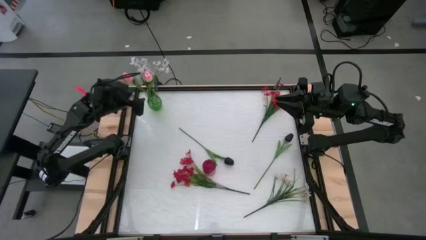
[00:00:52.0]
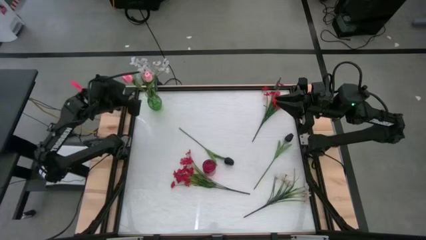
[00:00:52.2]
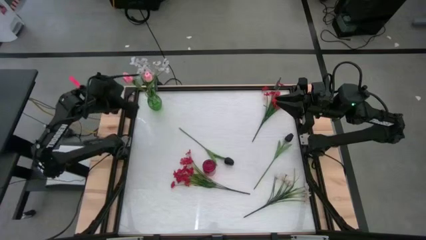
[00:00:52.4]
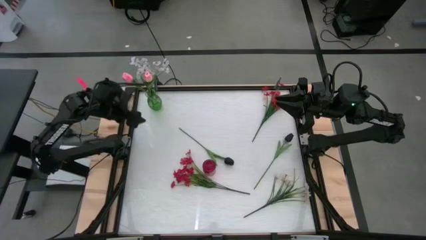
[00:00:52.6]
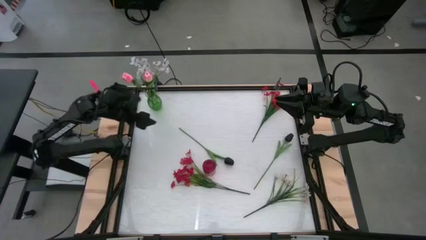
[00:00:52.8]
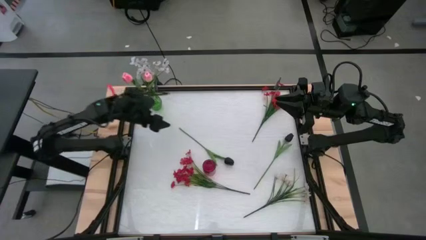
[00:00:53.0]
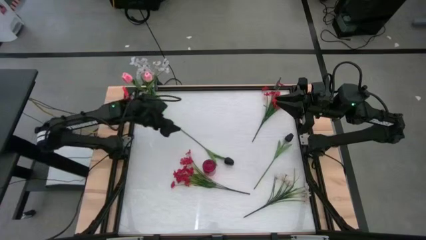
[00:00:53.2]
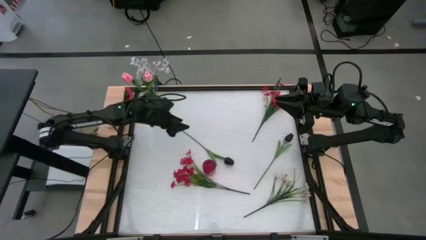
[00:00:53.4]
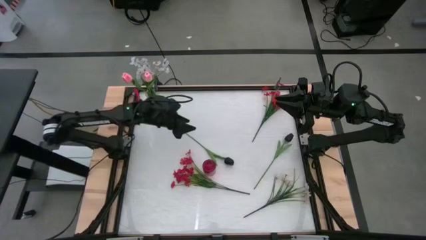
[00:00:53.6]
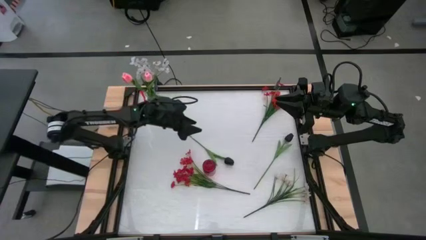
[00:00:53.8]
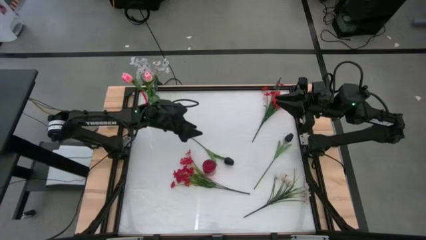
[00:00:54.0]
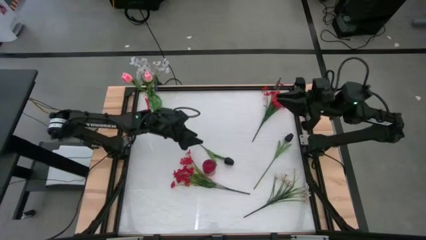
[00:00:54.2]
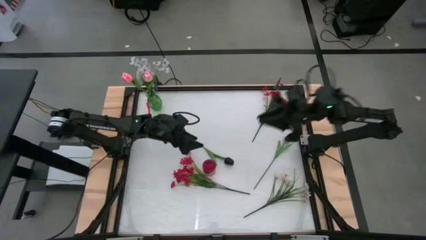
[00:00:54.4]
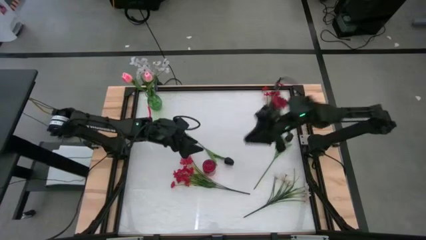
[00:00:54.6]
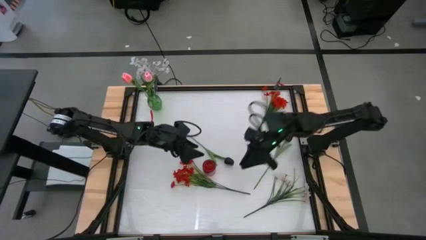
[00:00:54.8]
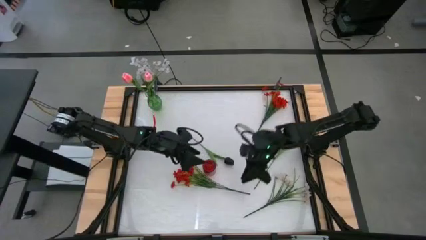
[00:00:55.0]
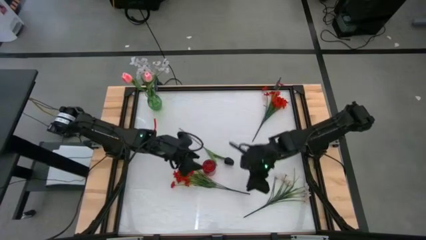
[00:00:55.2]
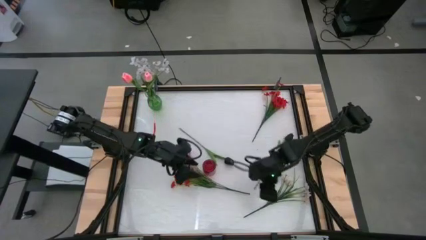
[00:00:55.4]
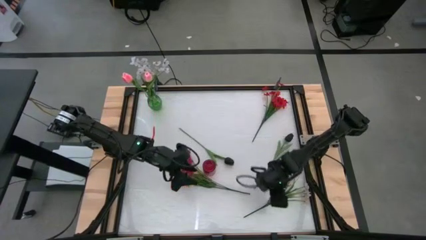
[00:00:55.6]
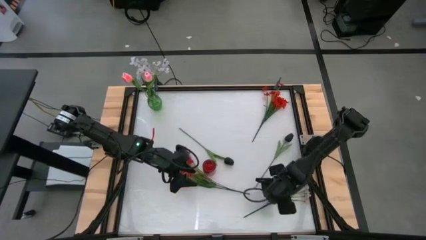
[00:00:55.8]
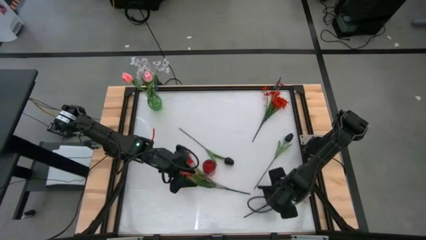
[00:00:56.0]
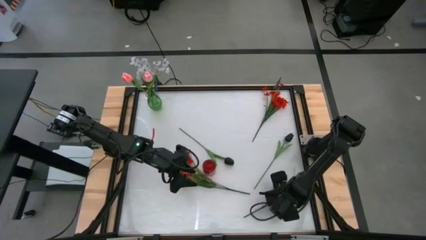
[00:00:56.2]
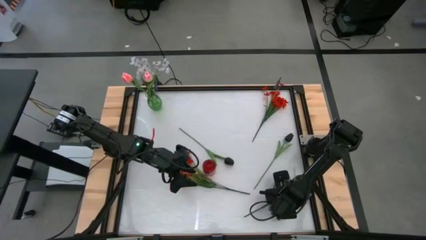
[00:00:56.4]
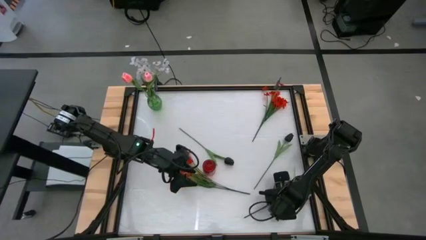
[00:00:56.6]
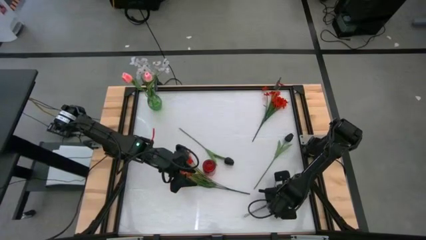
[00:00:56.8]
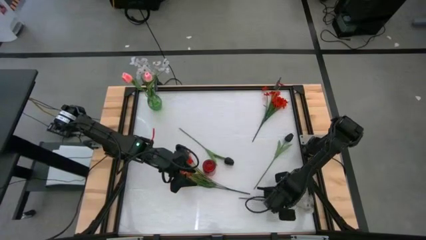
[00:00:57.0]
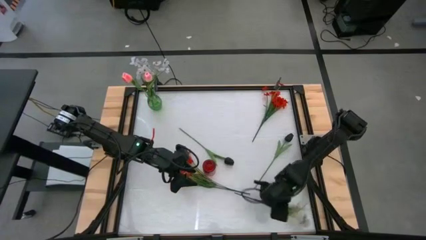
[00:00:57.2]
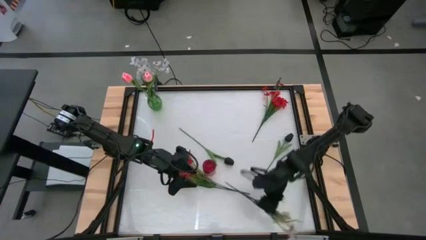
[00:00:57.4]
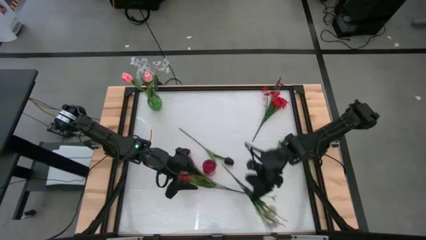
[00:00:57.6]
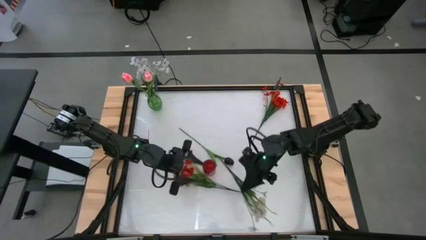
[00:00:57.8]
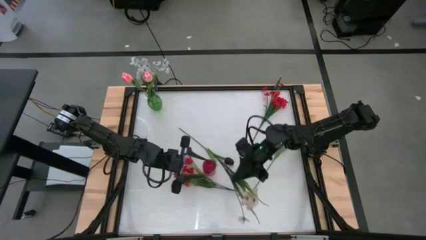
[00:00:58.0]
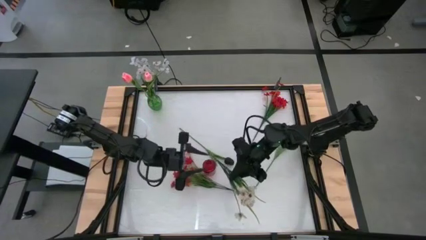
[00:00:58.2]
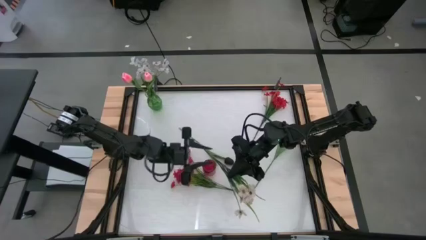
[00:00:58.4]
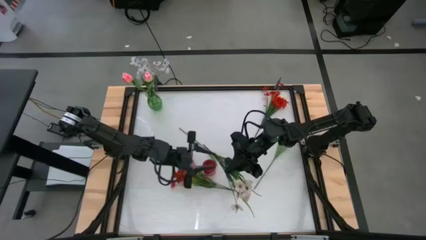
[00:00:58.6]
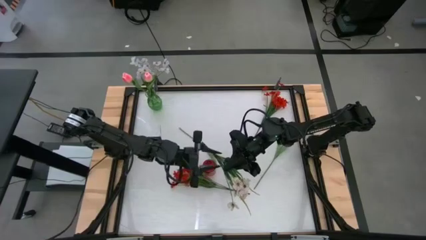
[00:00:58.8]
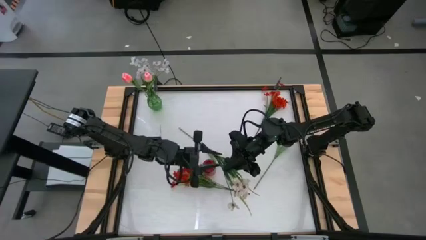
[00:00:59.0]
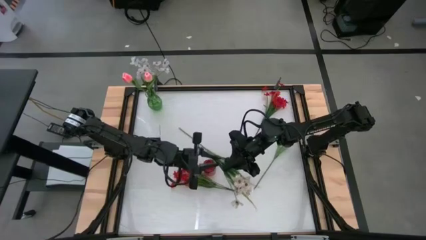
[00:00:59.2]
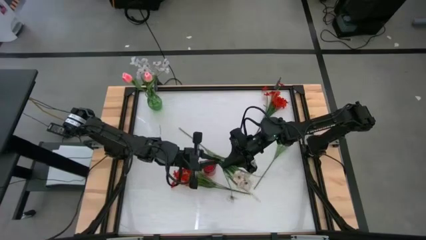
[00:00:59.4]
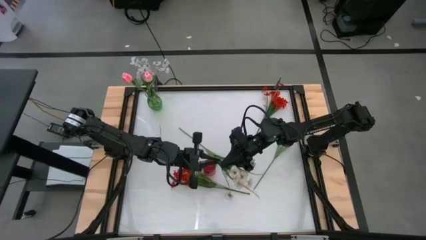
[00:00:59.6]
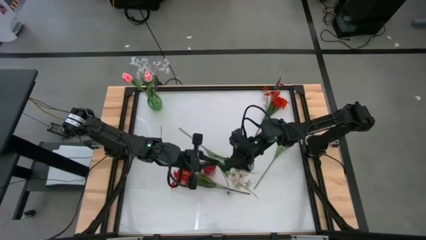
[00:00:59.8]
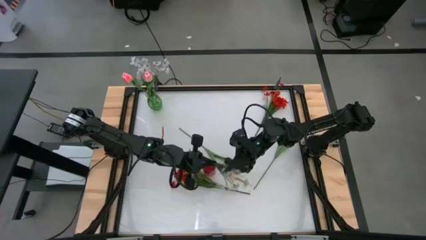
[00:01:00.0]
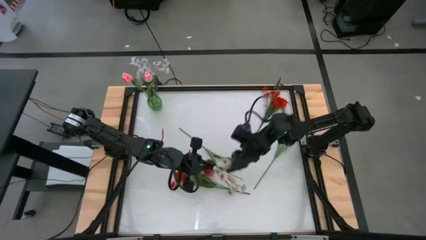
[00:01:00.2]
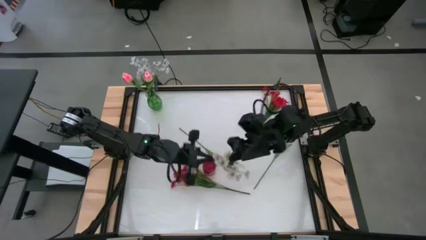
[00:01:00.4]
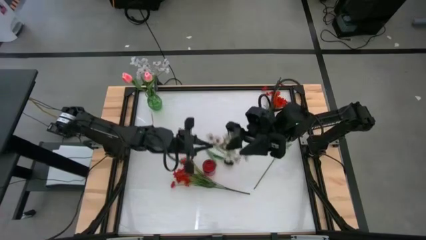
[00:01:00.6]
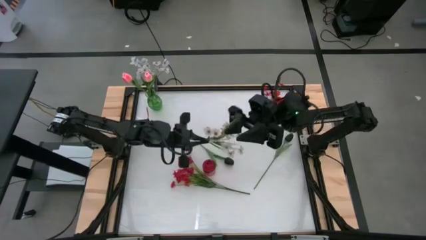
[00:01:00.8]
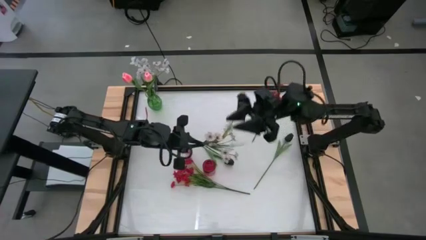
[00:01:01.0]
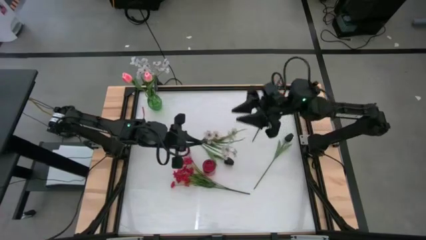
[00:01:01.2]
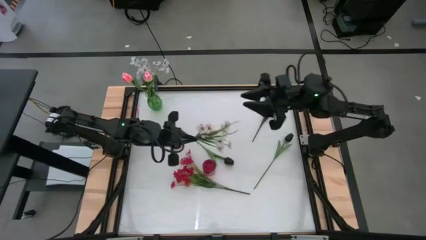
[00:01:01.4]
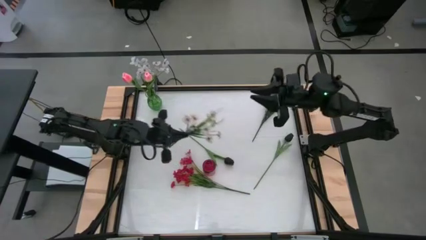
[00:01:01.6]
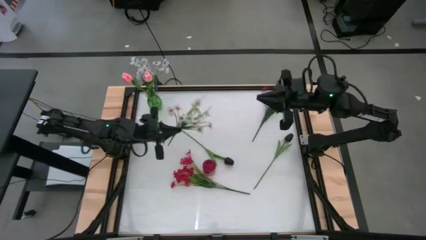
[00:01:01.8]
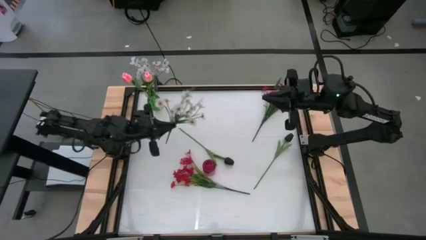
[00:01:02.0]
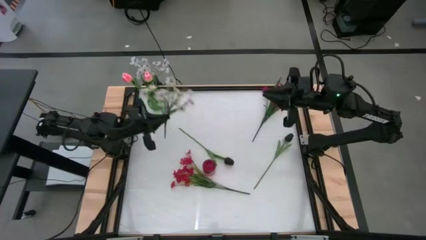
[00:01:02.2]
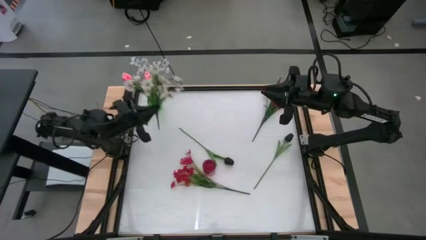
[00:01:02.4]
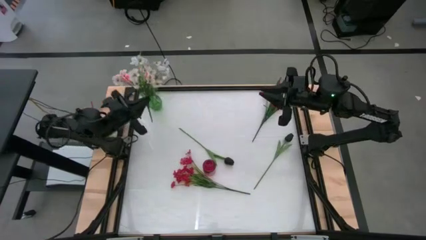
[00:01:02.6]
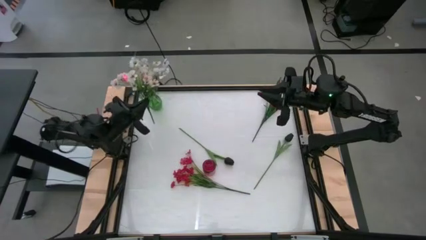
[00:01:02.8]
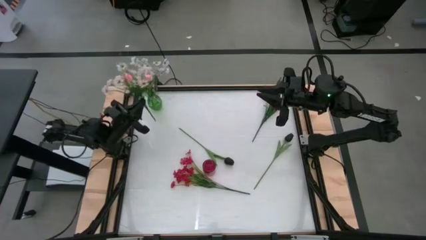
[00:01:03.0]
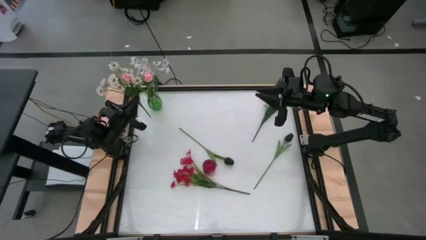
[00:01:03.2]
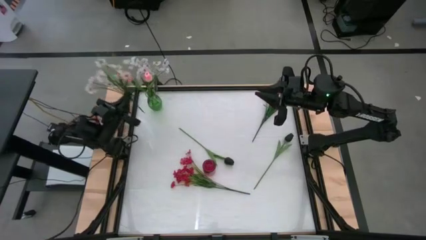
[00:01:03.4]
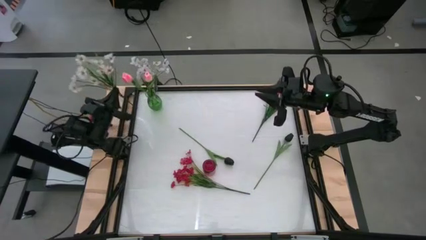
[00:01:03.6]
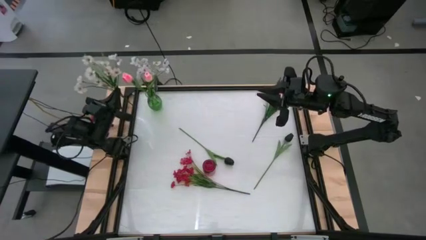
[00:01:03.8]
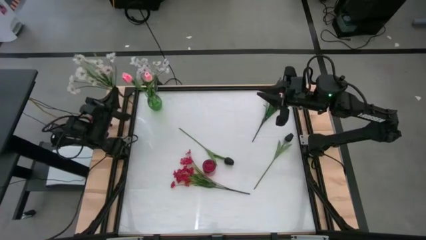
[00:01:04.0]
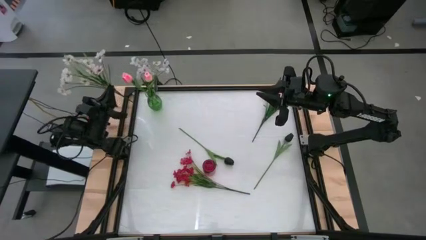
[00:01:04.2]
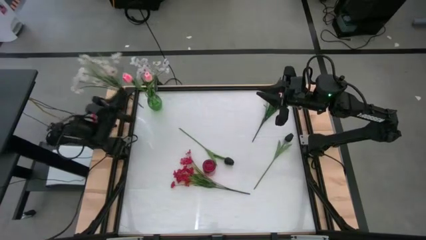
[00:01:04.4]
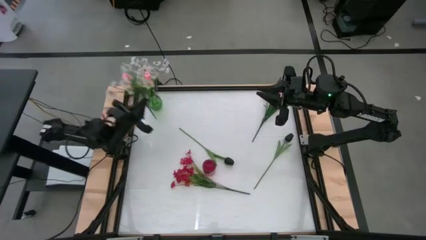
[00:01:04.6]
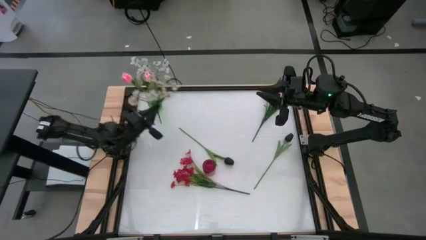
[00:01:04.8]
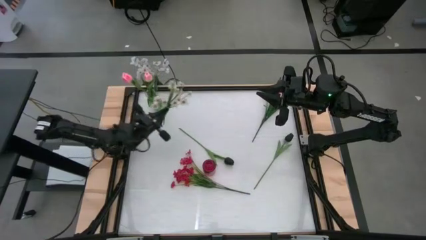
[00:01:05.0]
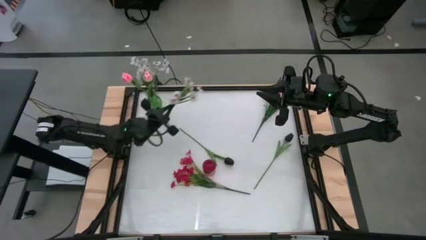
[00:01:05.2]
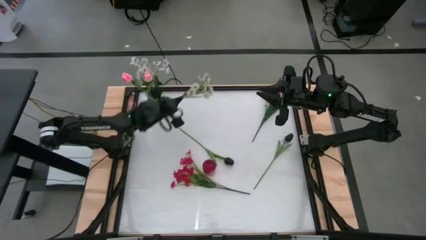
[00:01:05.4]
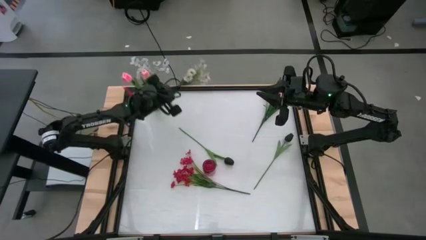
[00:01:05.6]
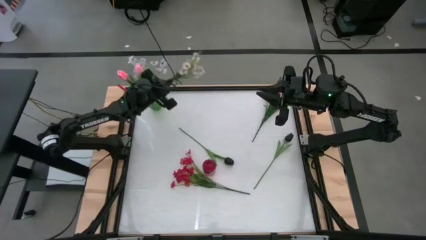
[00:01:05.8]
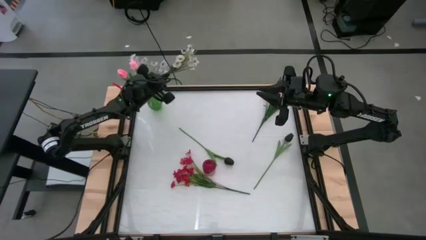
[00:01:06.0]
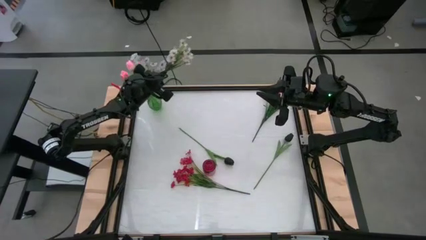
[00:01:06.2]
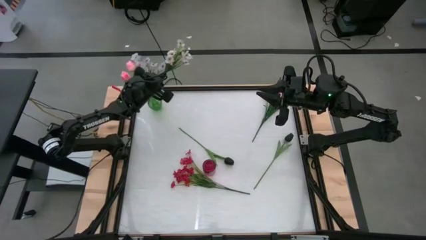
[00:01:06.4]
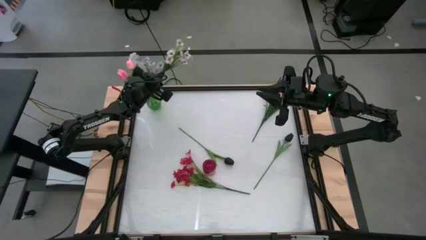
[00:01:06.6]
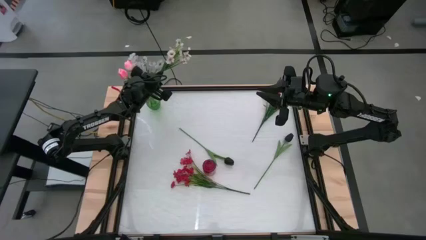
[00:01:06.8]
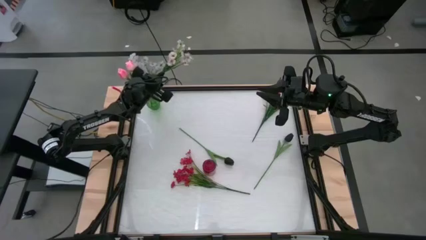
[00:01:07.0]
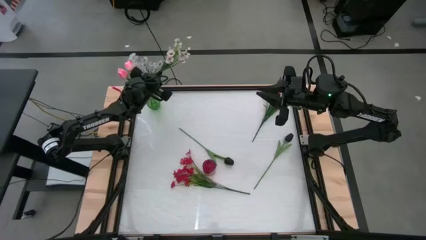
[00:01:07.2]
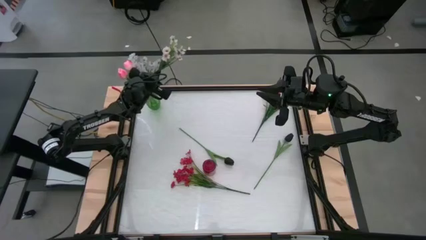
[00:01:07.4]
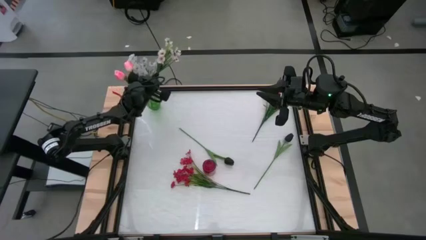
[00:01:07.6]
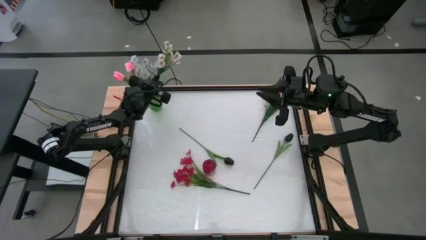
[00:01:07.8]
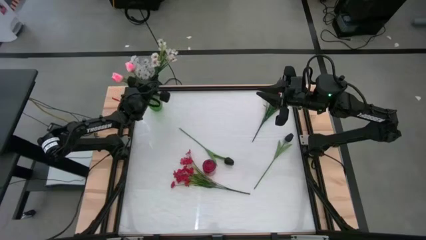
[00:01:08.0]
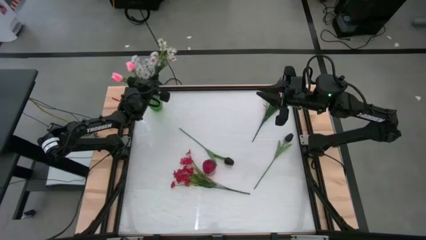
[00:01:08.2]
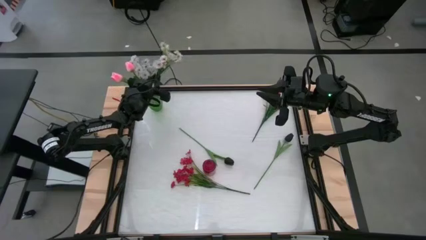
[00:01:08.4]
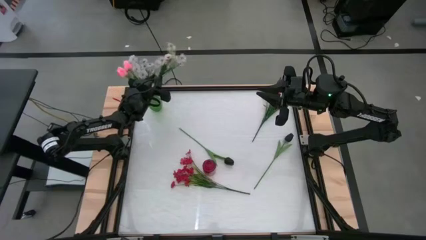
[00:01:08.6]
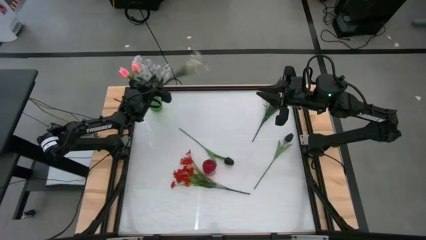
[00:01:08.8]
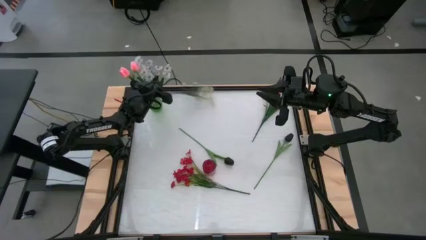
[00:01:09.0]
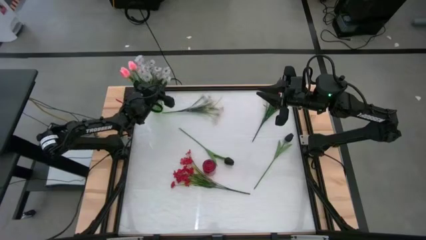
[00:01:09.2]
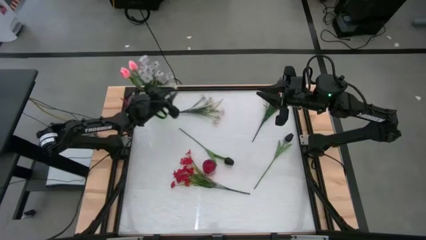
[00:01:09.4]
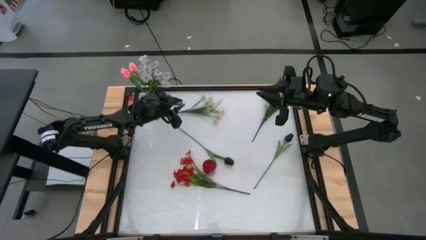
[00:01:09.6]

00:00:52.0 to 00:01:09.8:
Task: Sort flowers into vase by color
Put the white flowers into the green flower vase
